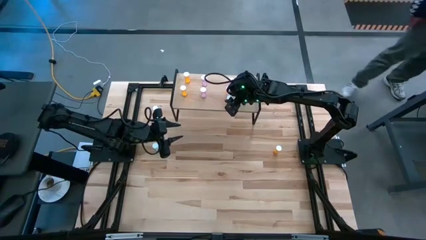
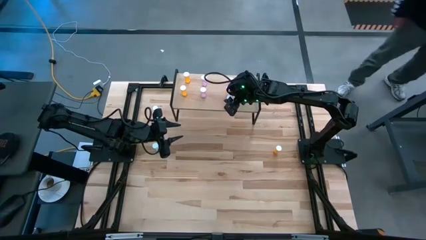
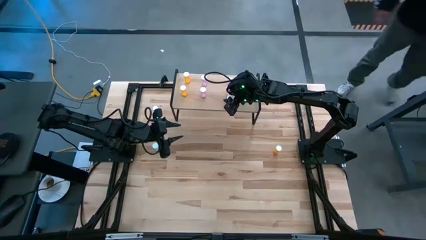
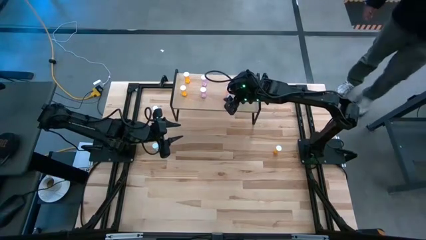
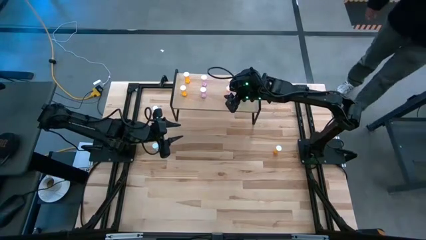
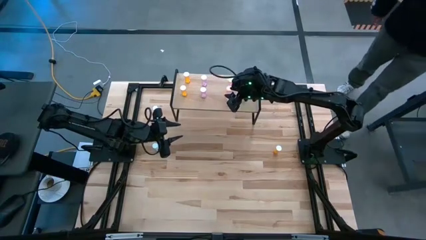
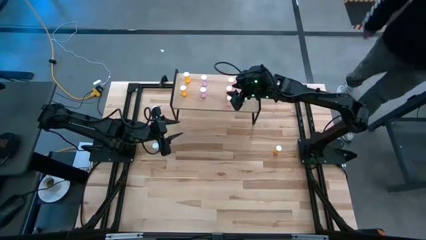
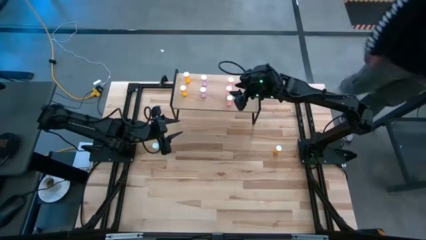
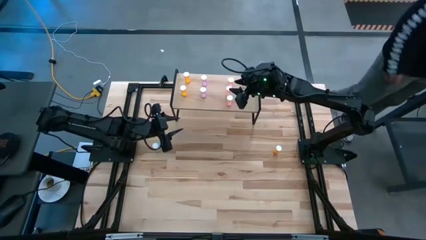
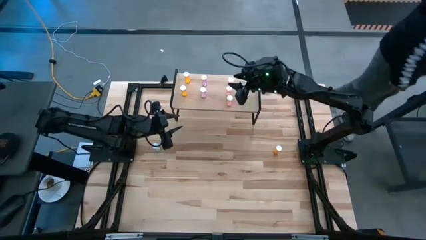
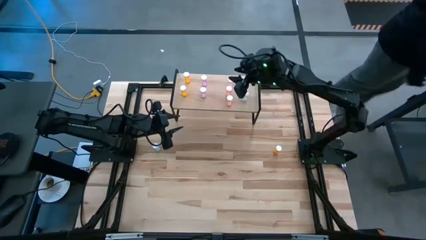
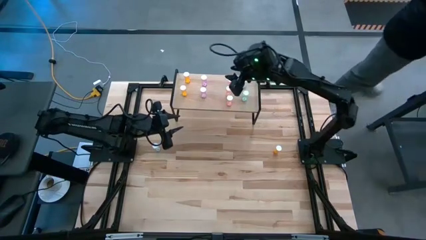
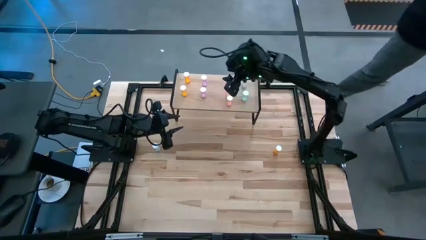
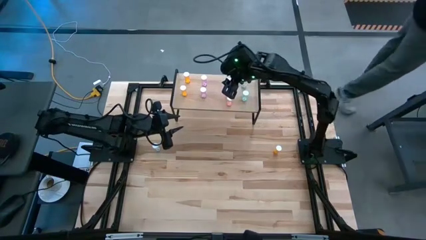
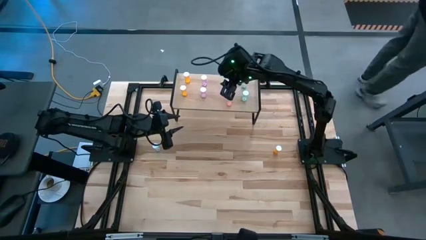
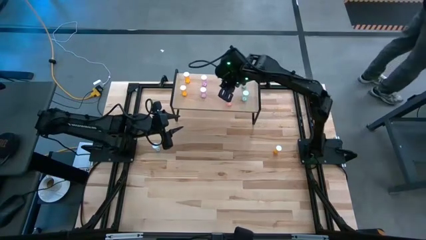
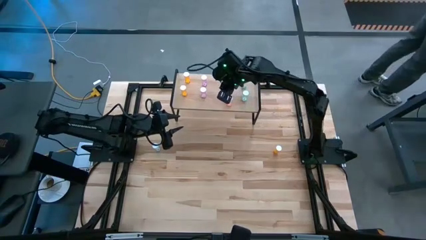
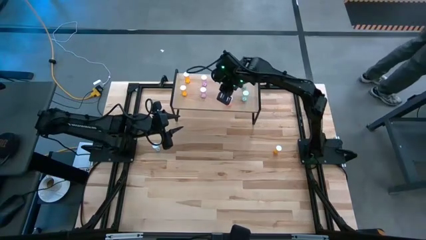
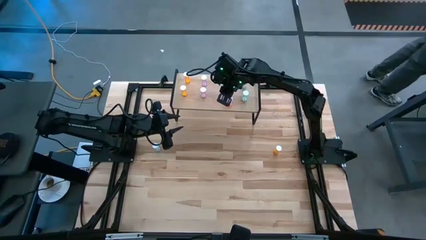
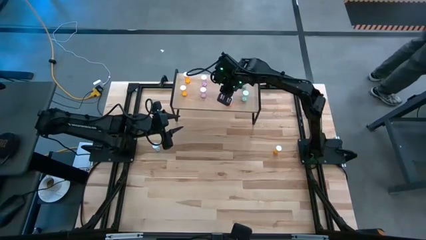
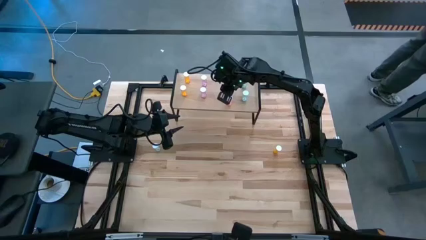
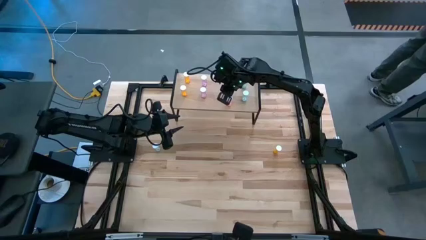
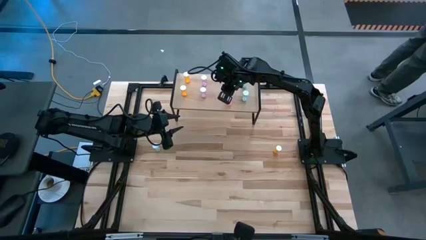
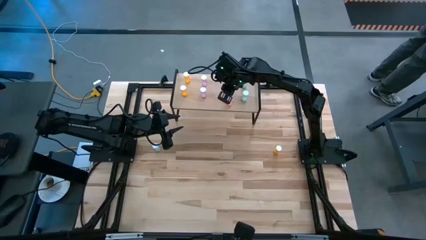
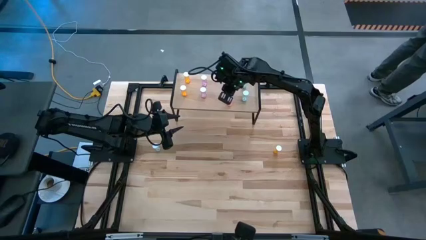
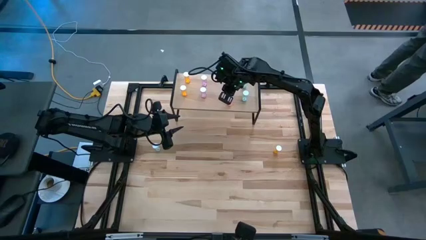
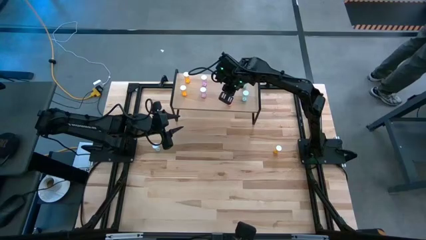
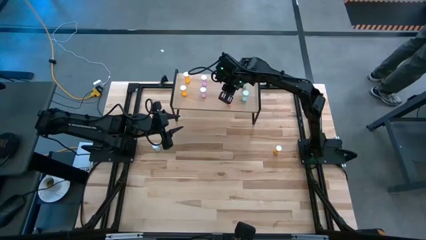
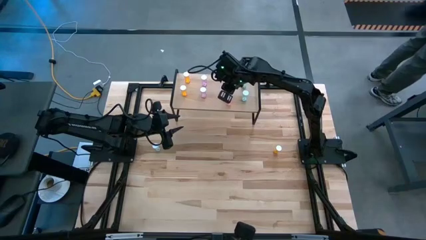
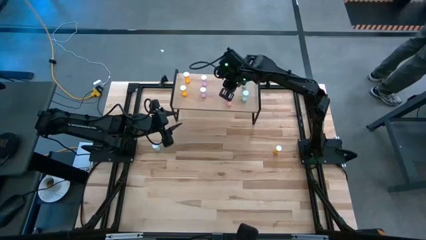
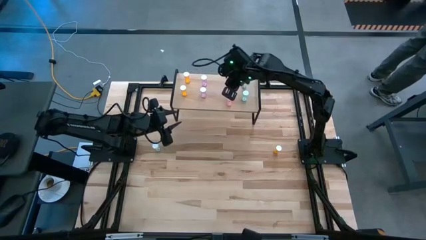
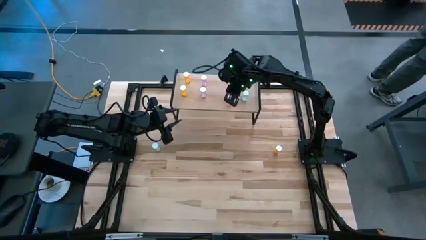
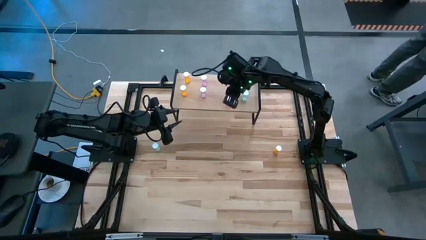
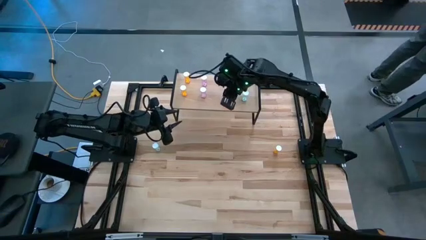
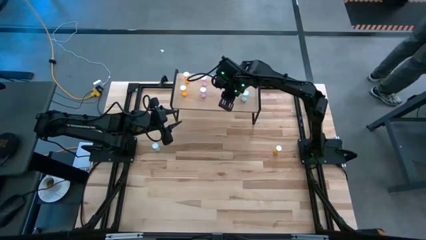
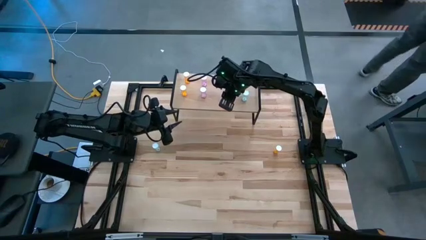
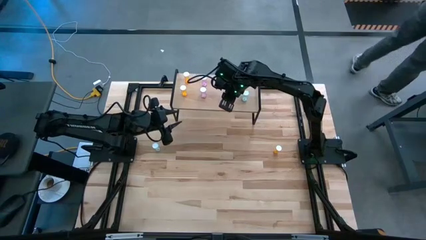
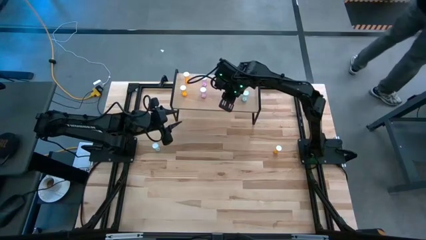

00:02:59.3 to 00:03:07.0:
Task: Pick and place medicine bottles onto shelf by color
Adjust the pink pill bottles on the shelf

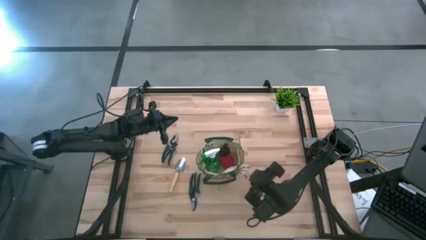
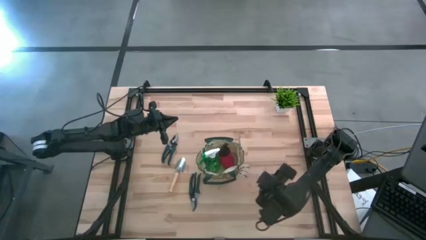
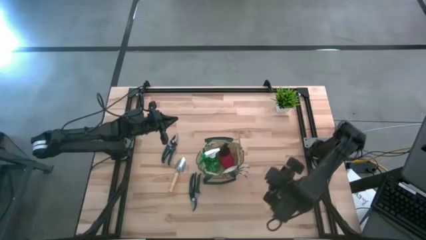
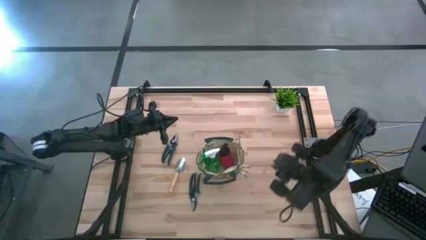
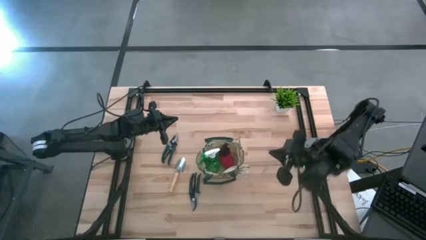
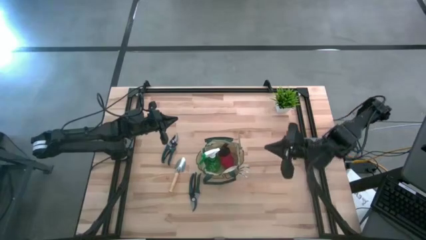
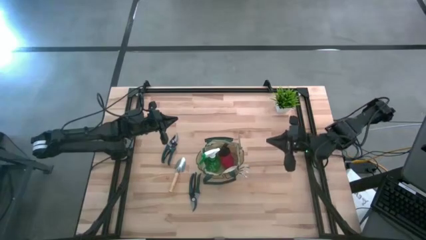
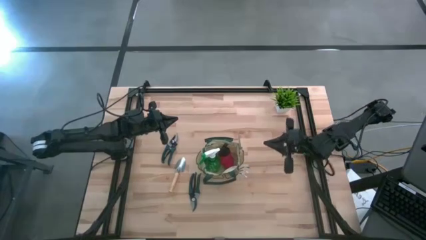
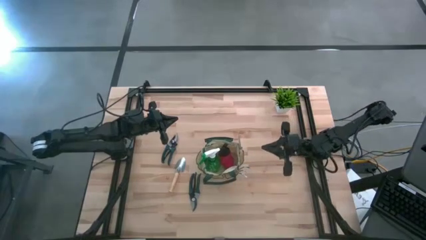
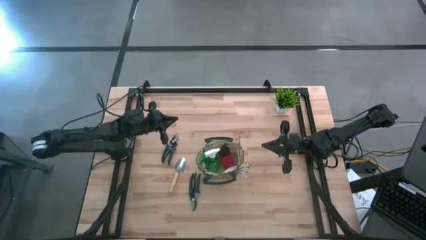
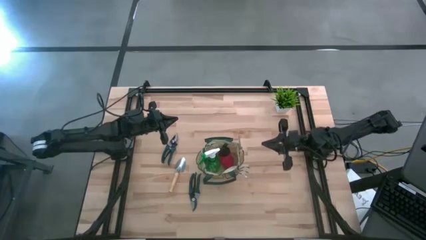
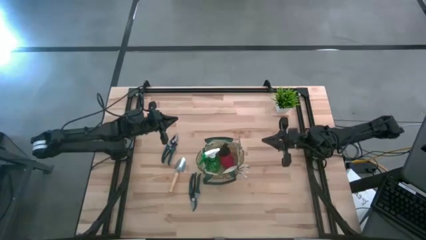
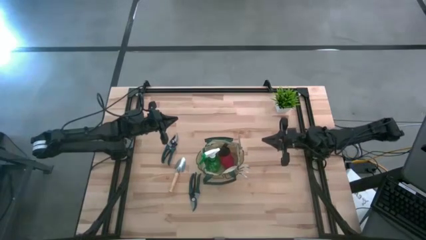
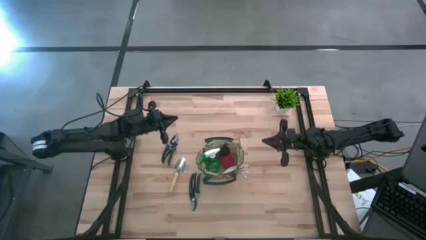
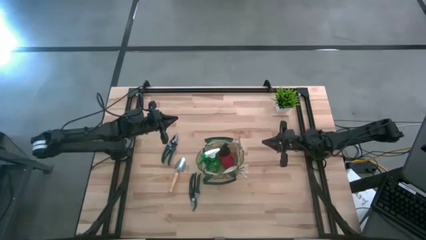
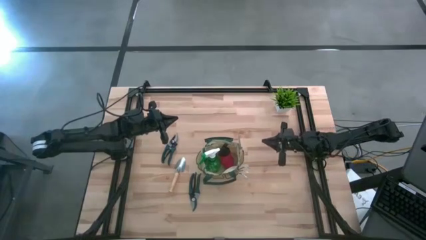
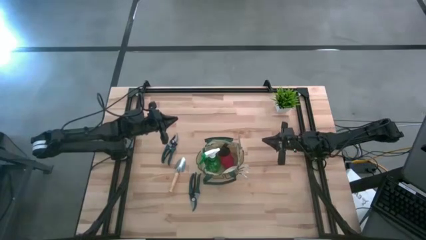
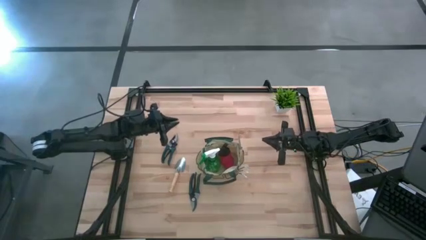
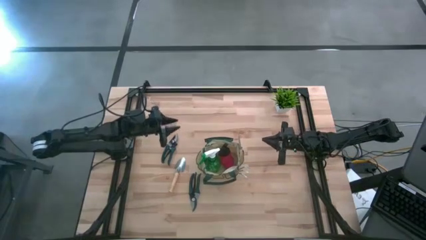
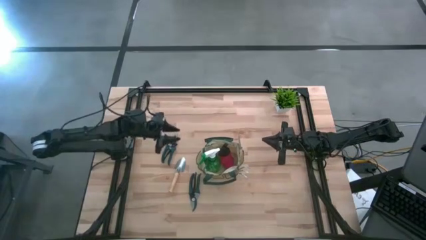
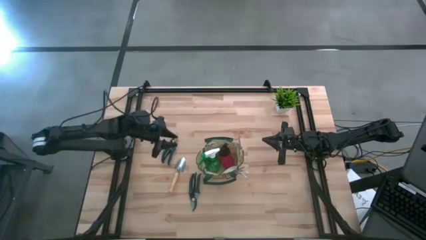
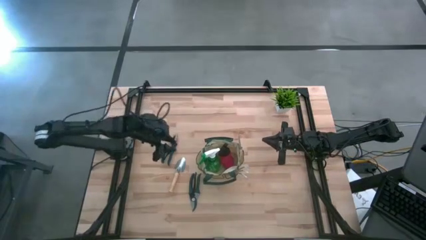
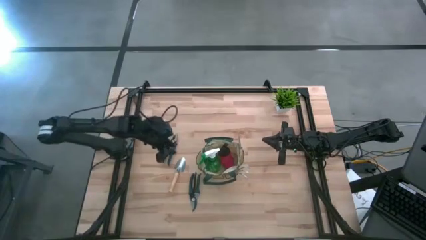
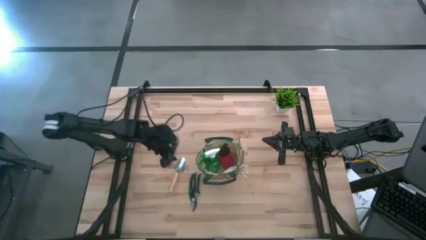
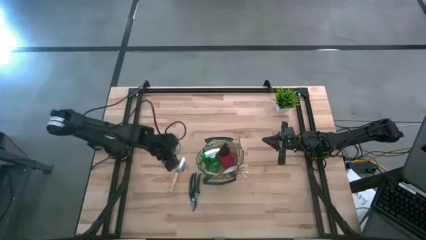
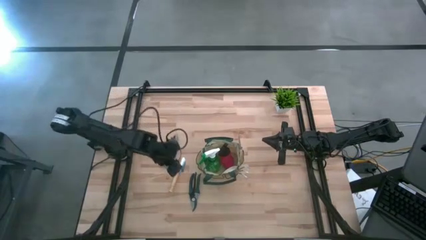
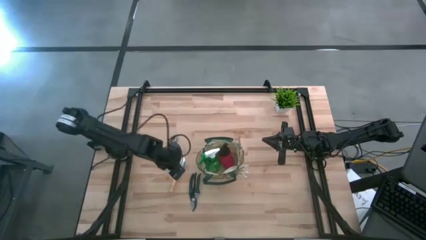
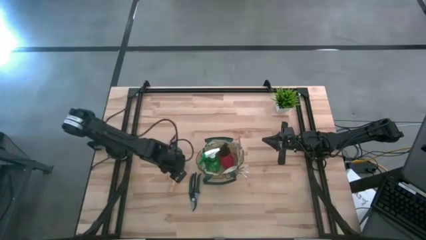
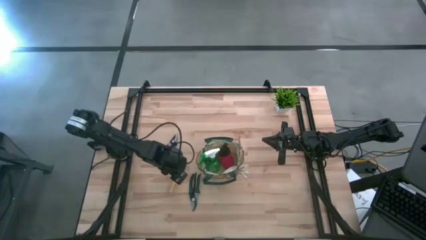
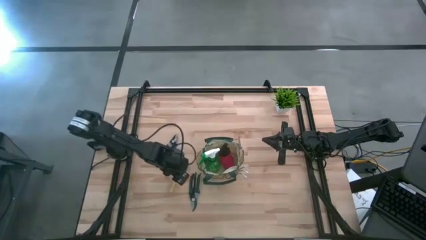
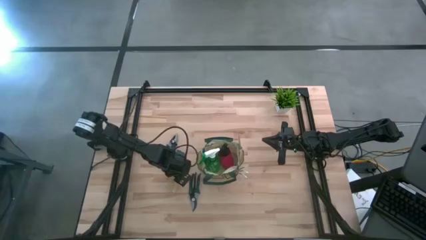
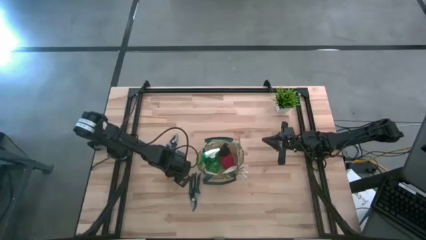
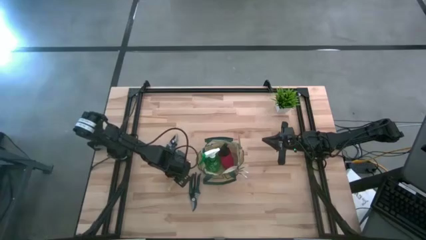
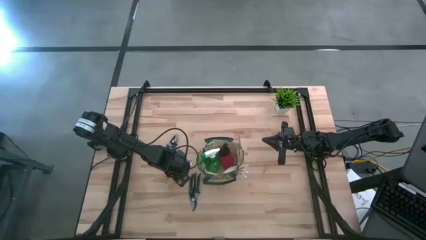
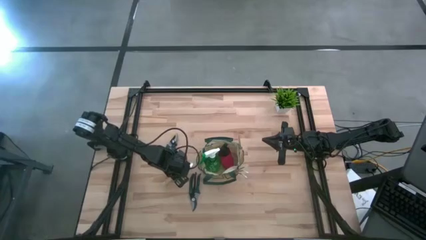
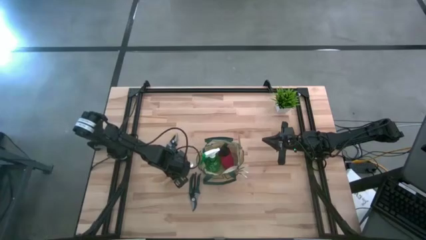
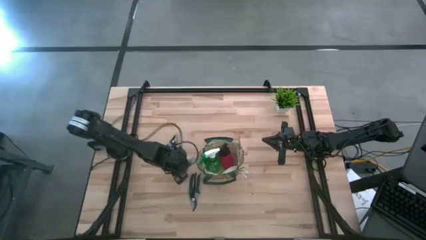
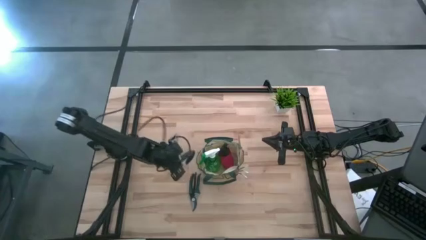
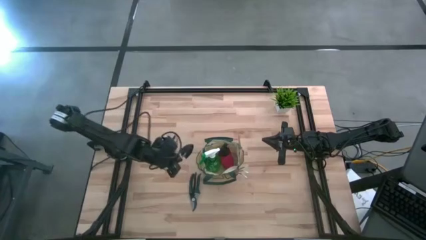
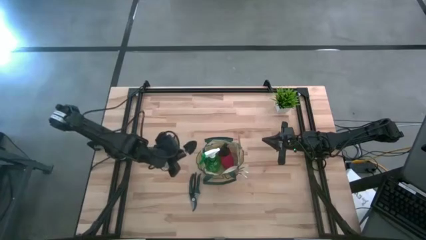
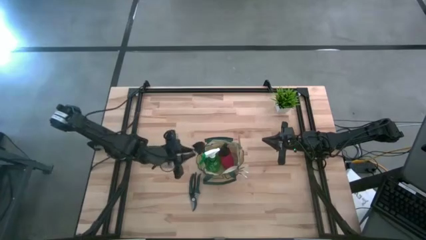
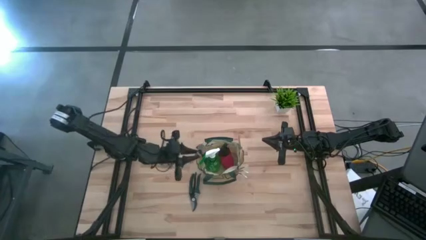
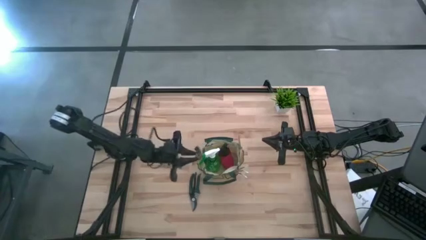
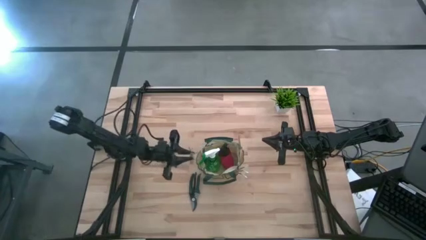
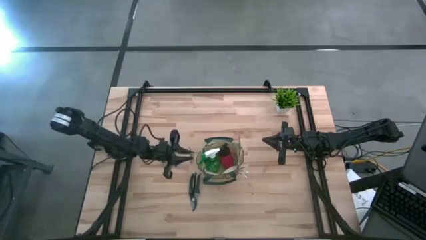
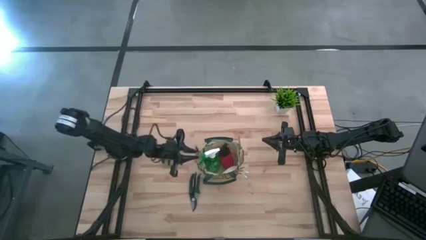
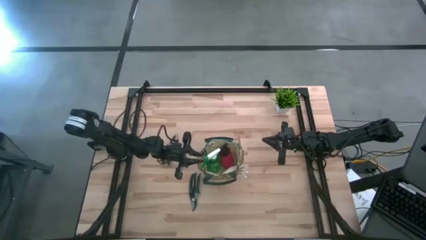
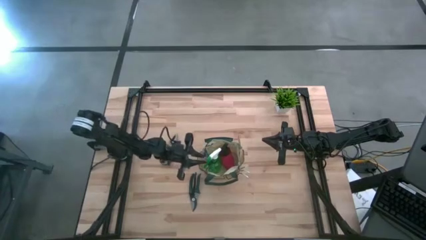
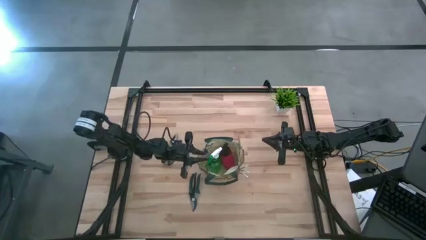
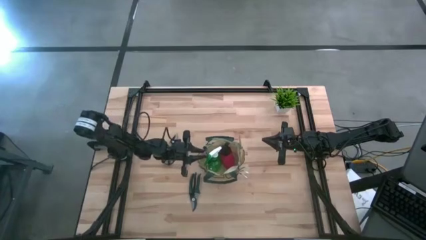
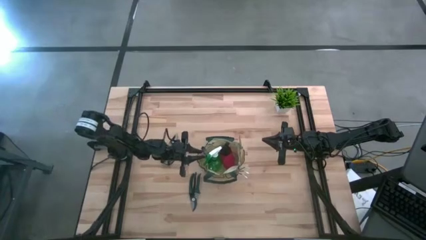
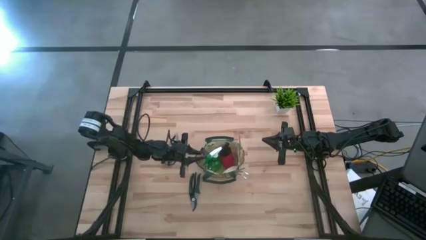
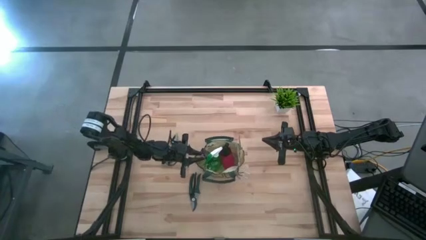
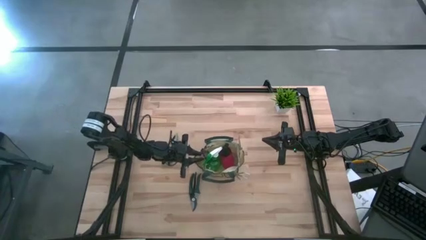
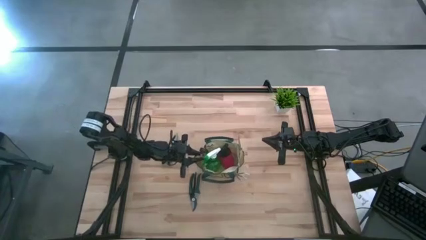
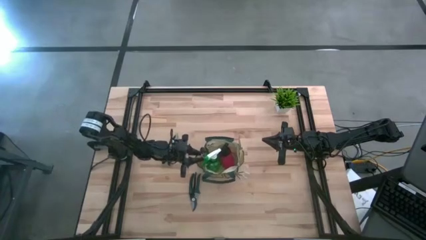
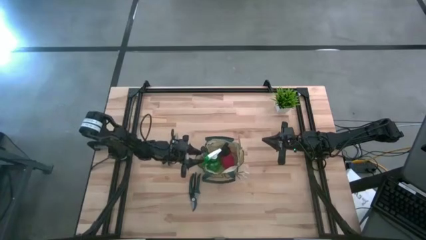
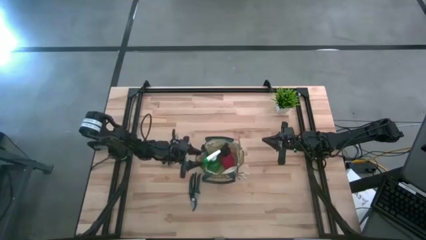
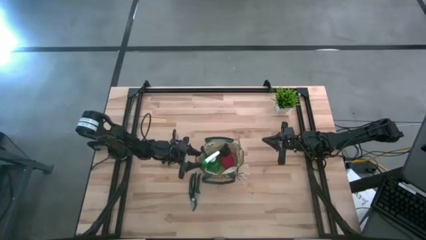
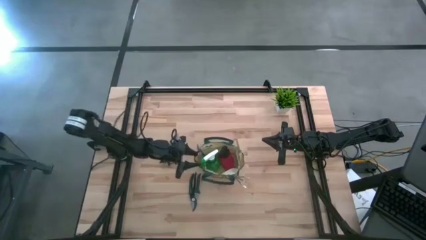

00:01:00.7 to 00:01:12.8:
Task: Pick & Place Garden tools in Gardening bag
Put the brown trowel into the white gardening bag
